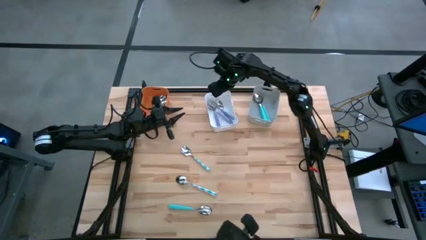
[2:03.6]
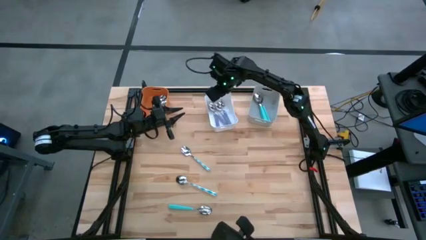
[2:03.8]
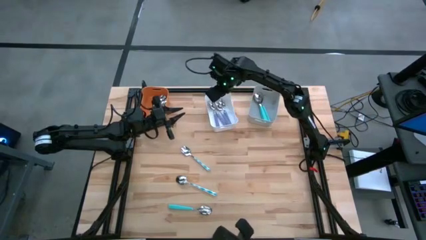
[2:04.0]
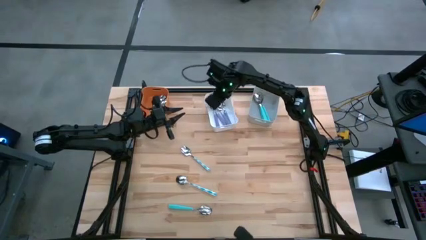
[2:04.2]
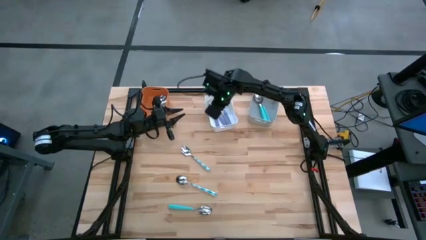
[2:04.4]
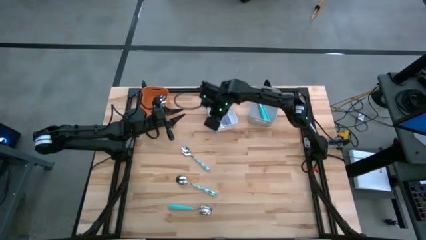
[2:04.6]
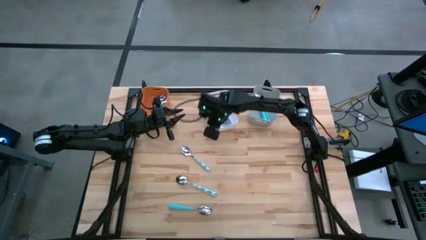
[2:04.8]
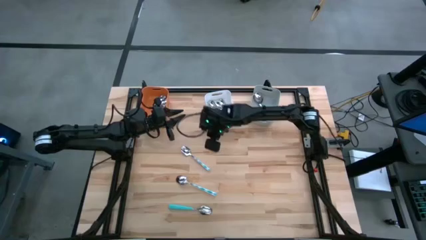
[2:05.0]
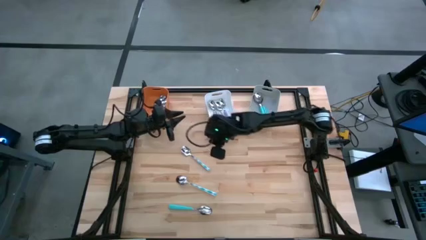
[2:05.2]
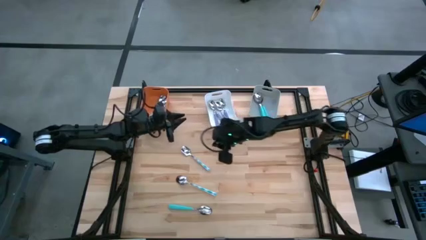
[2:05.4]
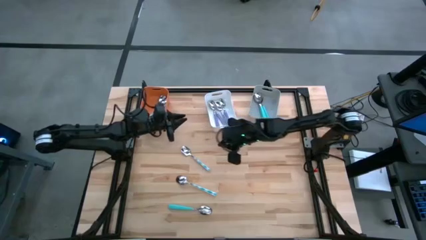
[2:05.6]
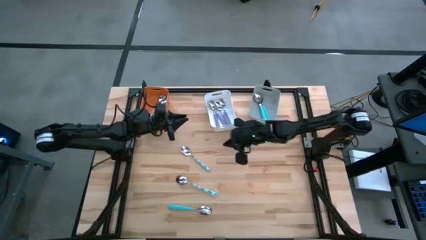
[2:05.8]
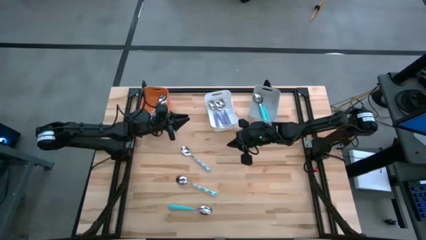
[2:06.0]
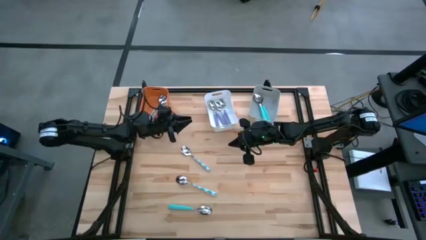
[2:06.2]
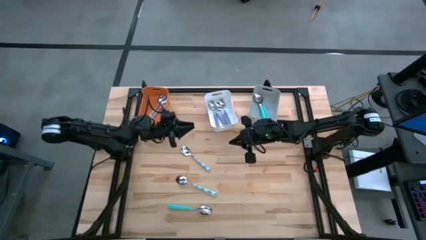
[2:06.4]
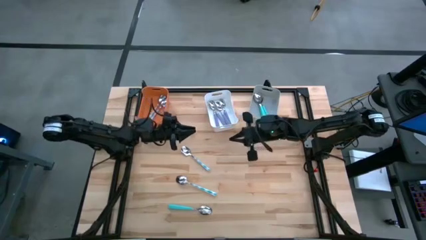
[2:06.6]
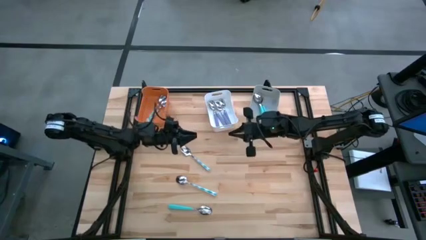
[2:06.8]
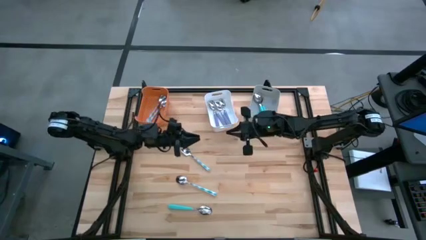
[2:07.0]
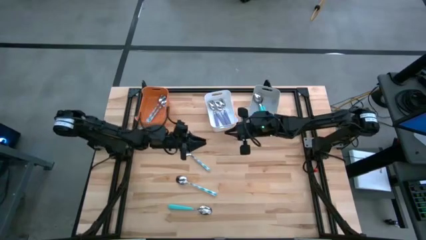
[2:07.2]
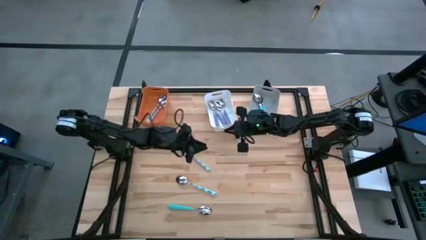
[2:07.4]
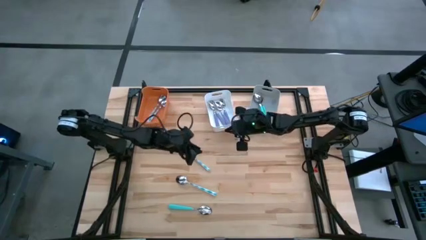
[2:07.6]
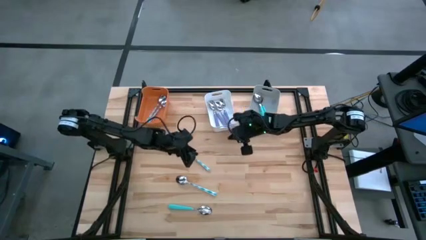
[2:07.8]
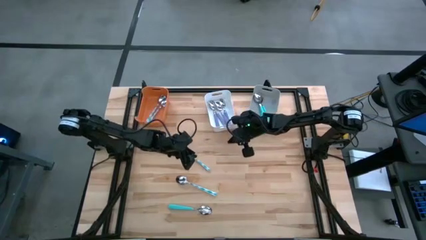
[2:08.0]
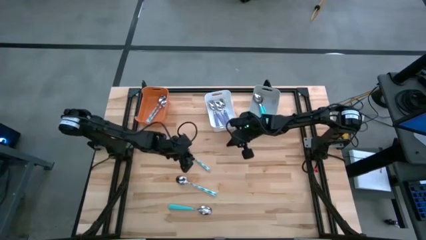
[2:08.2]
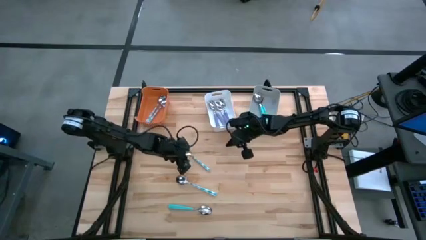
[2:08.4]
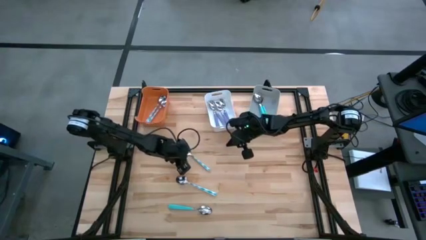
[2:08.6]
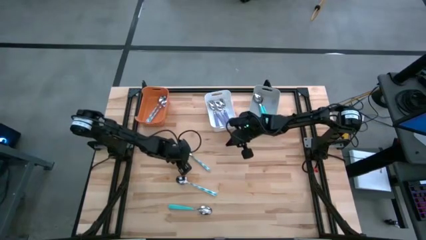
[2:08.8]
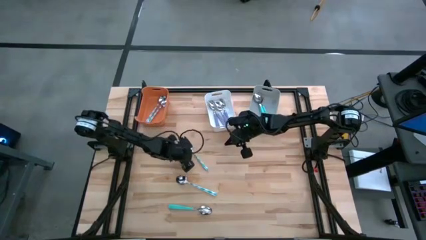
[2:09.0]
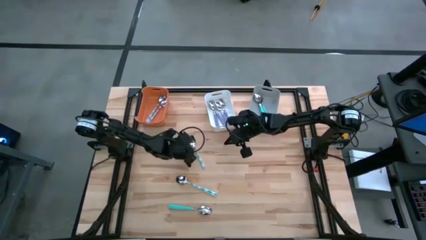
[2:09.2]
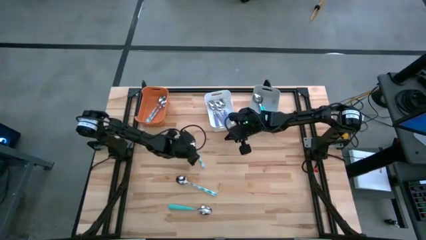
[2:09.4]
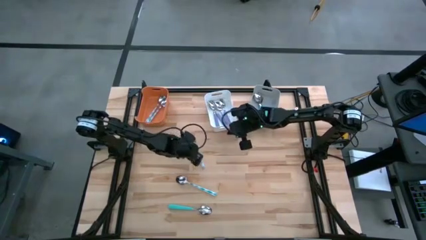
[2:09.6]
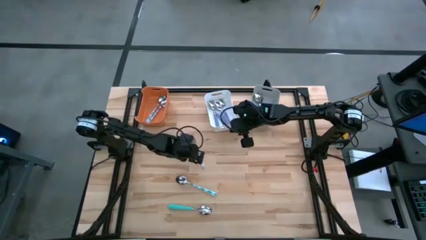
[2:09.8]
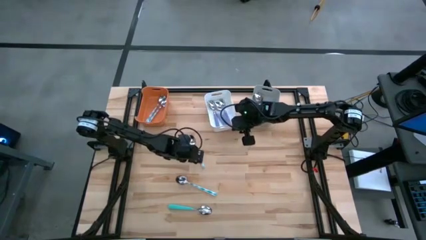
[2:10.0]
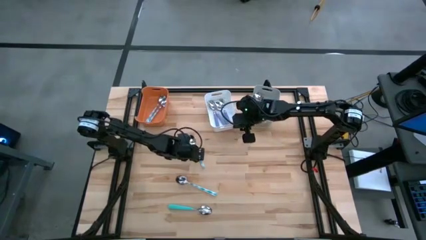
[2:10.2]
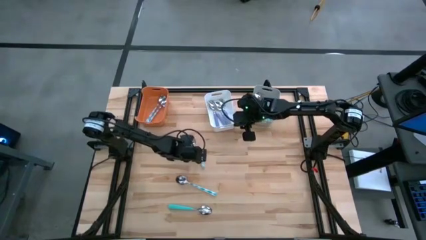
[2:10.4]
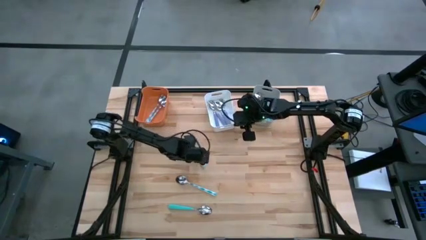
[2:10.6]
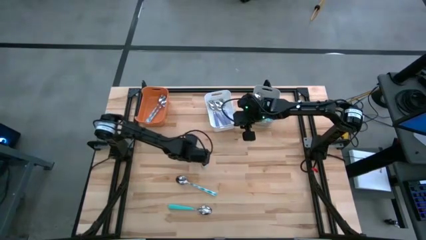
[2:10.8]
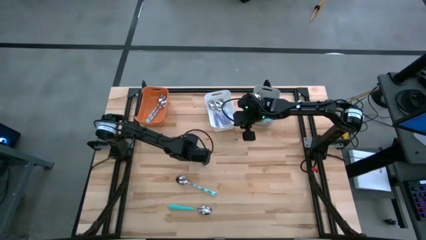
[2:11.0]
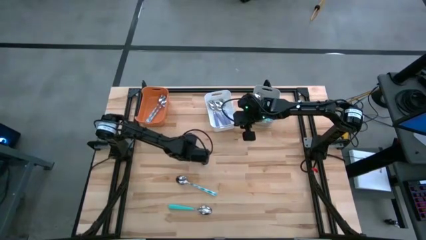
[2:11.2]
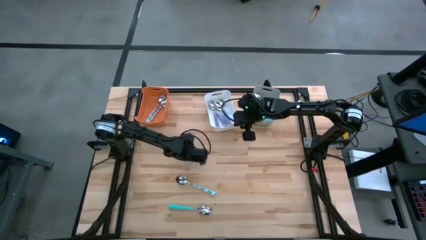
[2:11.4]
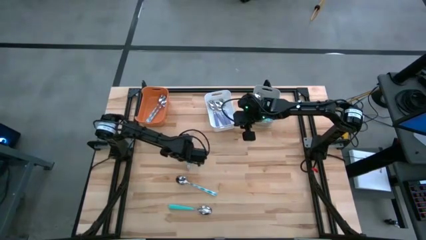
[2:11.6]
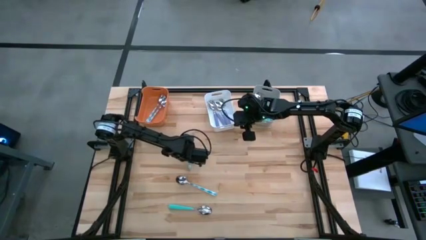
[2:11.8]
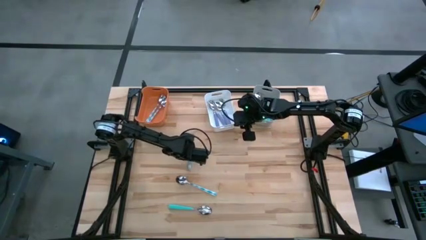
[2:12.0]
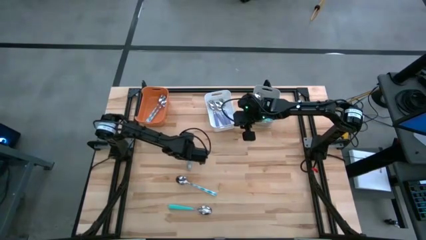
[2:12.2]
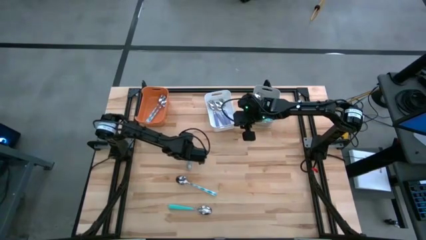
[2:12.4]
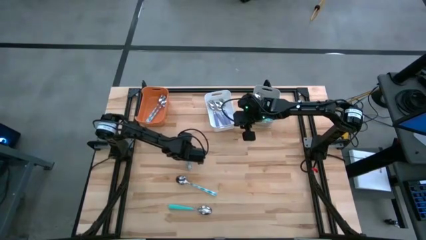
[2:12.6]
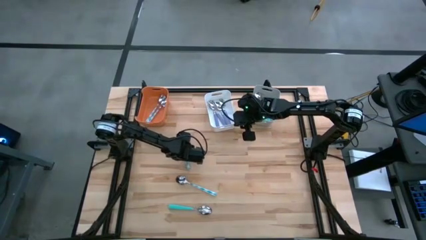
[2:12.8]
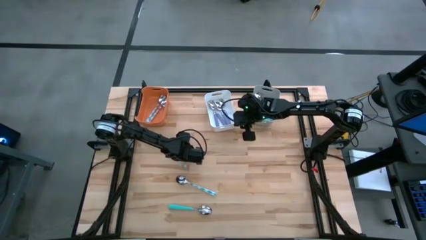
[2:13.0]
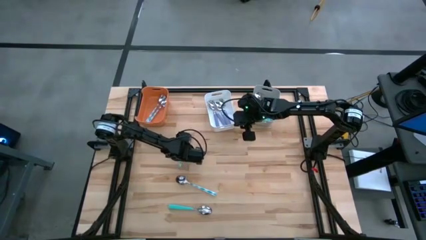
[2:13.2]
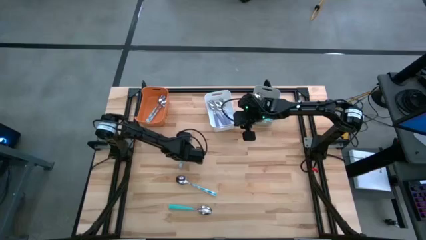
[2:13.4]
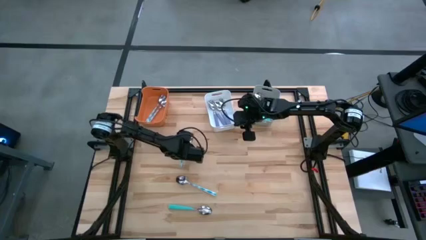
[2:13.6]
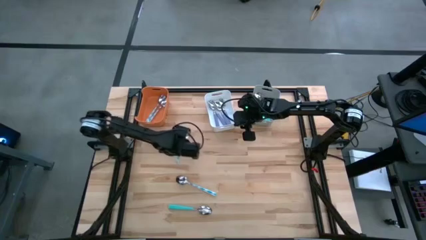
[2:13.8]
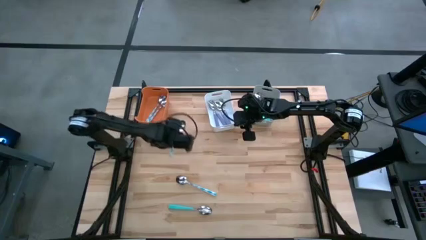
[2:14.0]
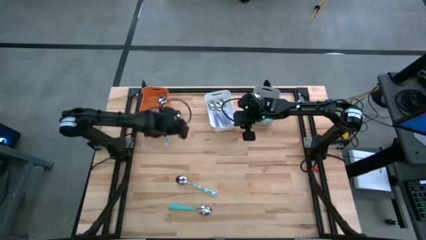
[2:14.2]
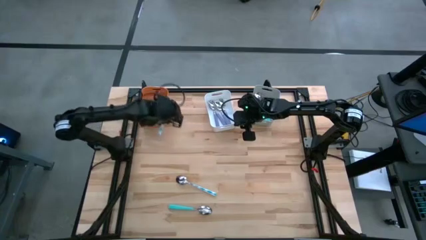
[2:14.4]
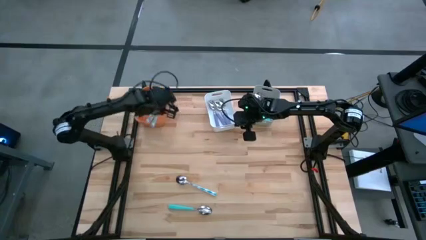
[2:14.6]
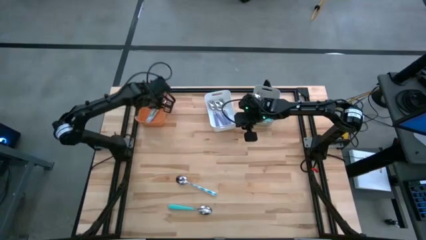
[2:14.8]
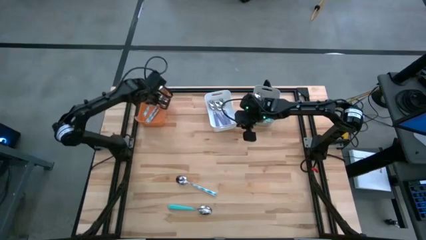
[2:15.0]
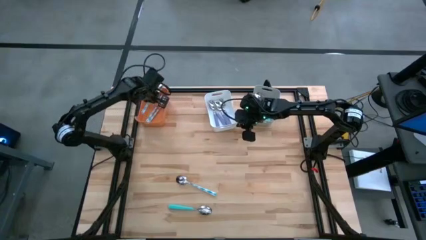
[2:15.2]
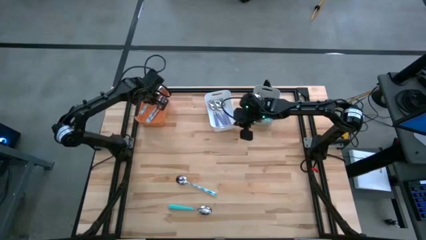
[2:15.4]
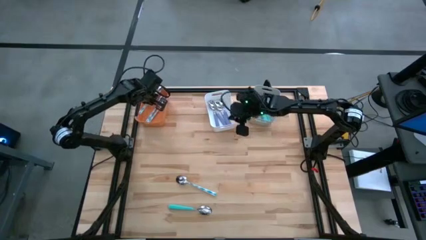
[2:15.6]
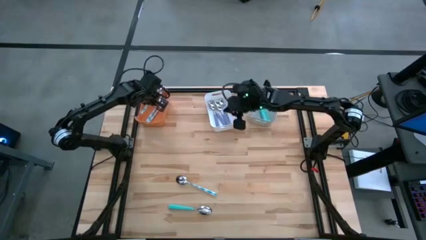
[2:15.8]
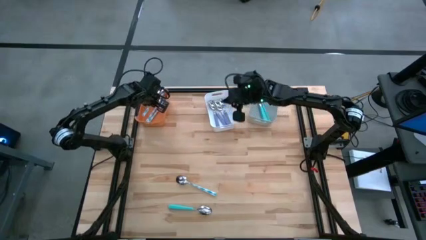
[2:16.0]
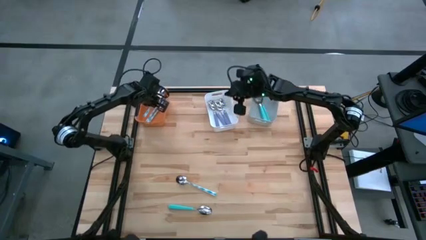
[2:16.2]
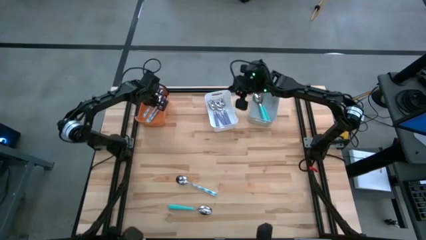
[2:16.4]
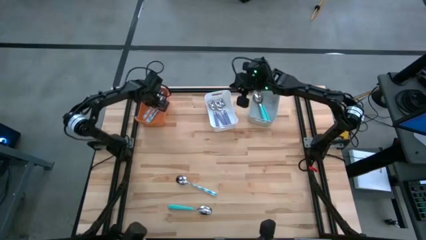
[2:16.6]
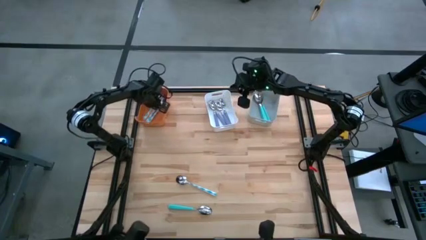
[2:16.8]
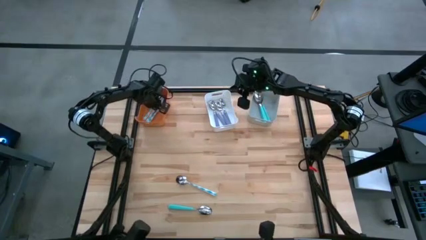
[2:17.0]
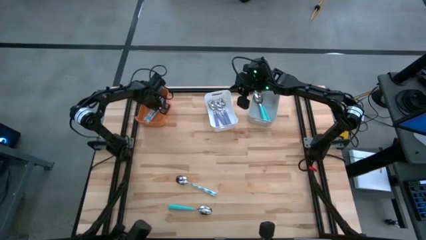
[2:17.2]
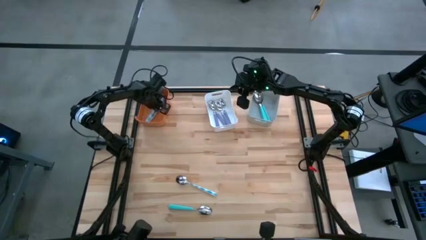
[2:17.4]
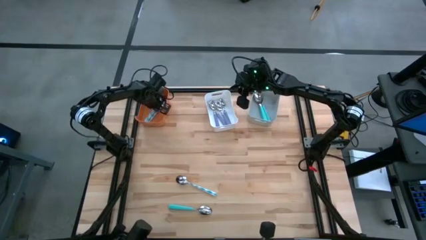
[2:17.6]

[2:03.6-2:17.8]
Task: Sort silverware by color (type)
Put the blue patterned spoon into the orange bin
